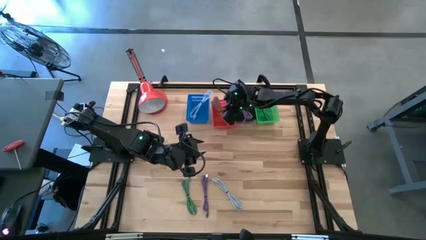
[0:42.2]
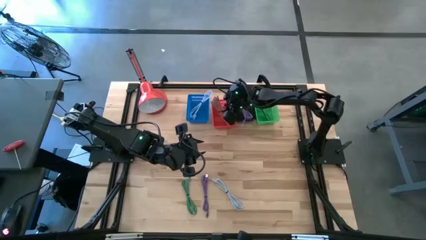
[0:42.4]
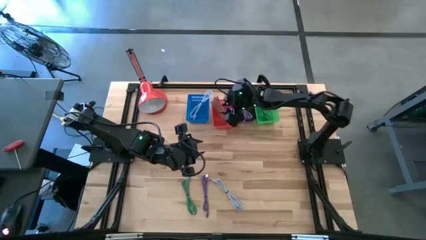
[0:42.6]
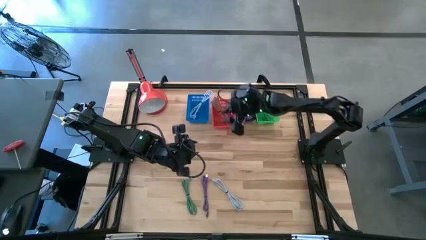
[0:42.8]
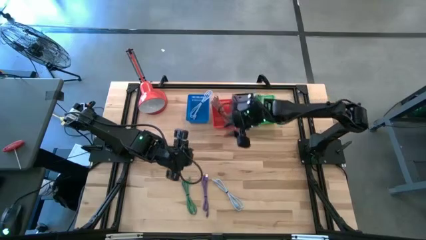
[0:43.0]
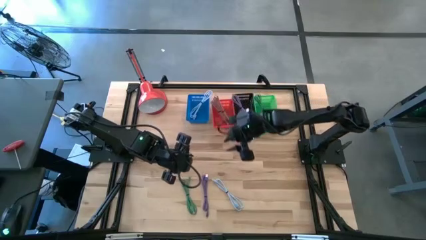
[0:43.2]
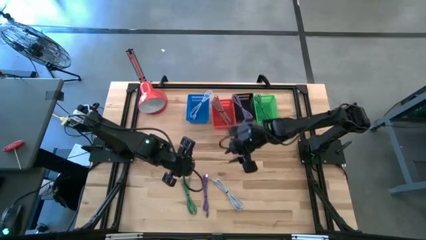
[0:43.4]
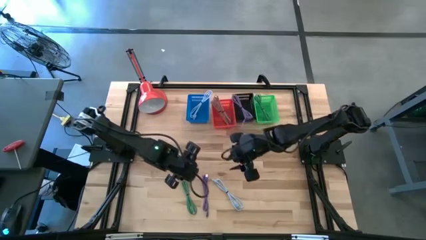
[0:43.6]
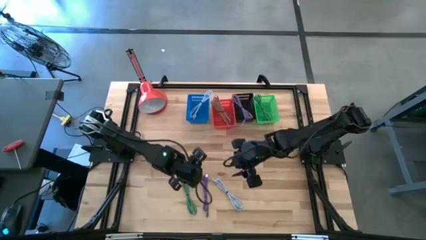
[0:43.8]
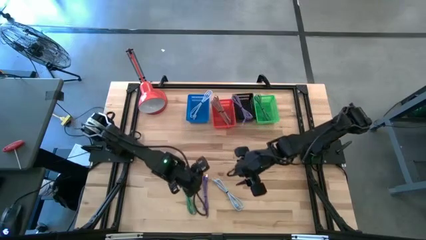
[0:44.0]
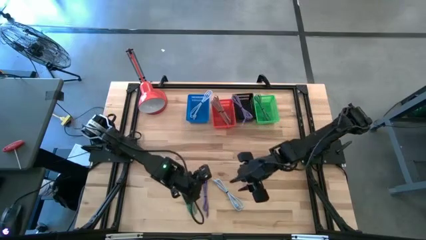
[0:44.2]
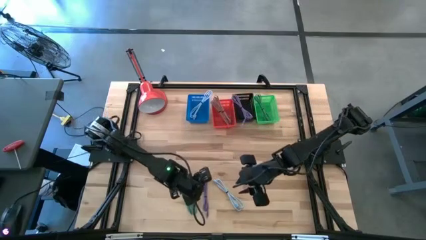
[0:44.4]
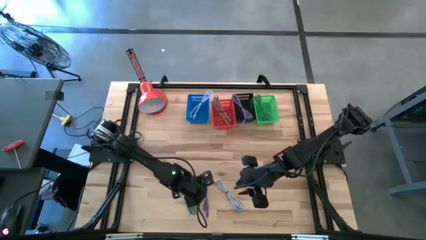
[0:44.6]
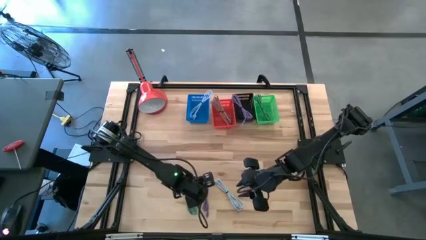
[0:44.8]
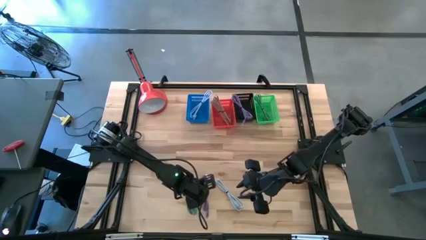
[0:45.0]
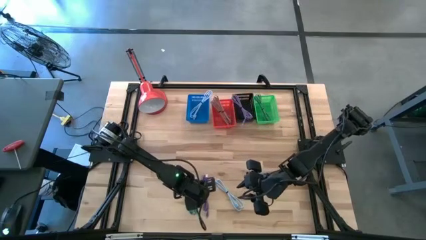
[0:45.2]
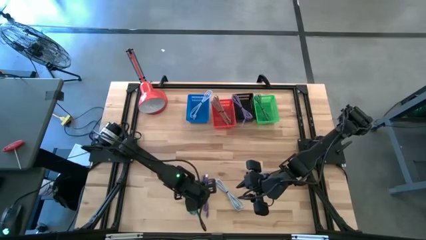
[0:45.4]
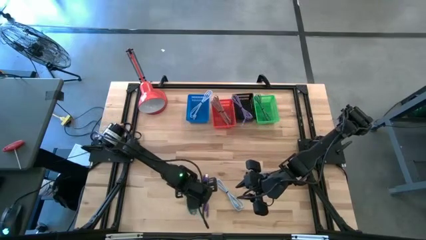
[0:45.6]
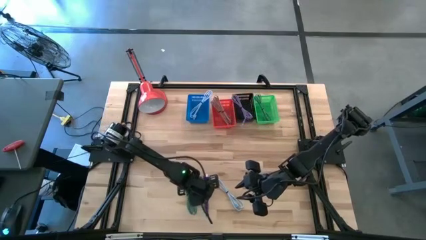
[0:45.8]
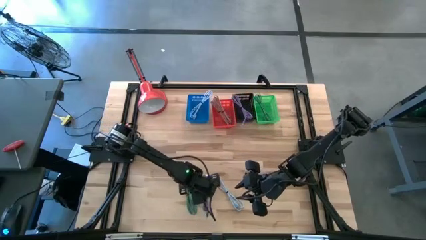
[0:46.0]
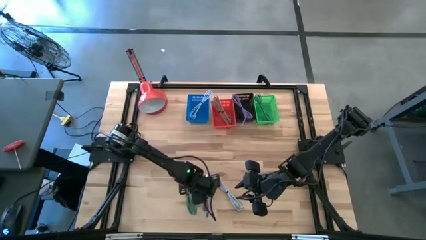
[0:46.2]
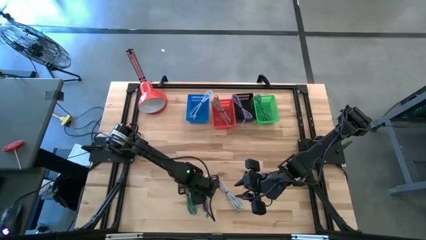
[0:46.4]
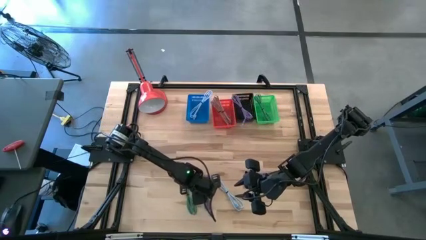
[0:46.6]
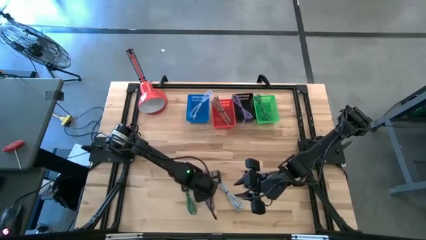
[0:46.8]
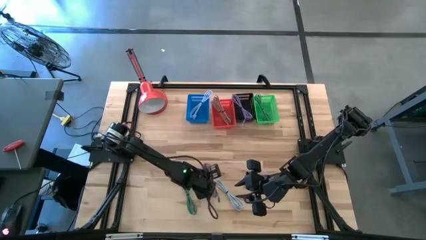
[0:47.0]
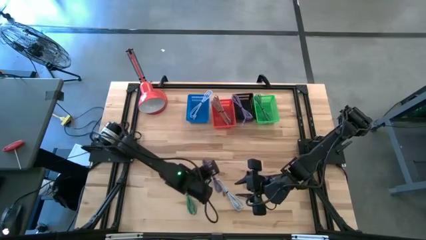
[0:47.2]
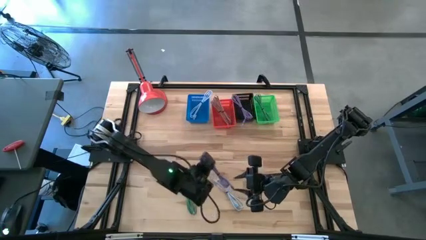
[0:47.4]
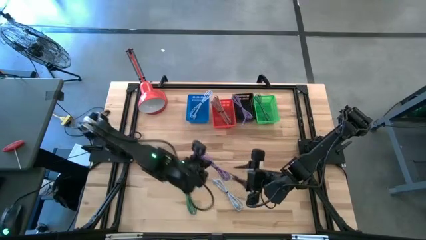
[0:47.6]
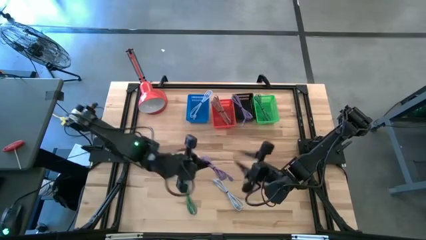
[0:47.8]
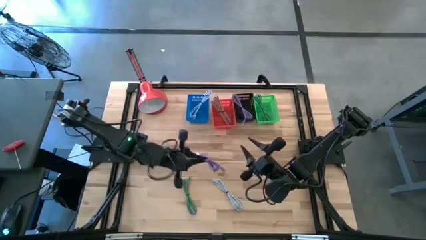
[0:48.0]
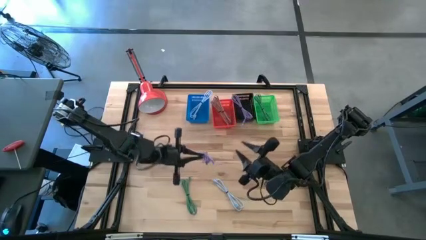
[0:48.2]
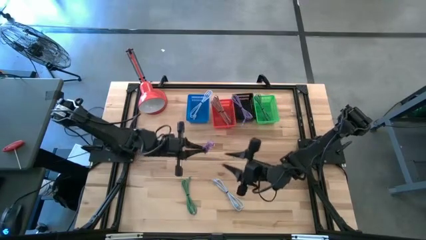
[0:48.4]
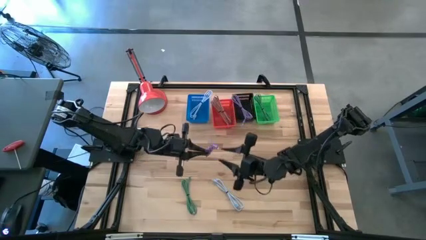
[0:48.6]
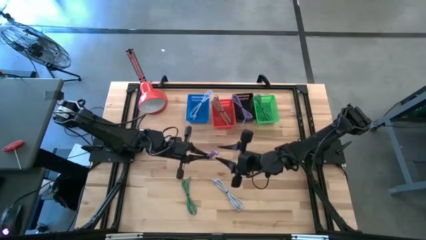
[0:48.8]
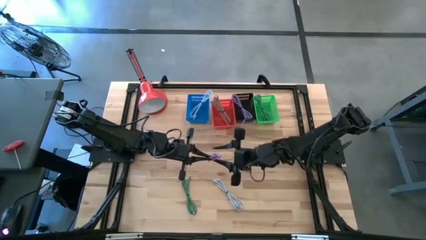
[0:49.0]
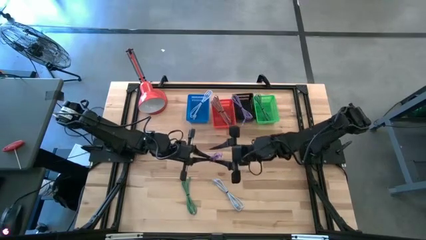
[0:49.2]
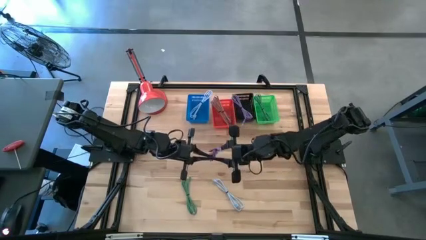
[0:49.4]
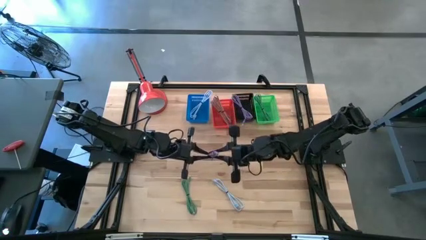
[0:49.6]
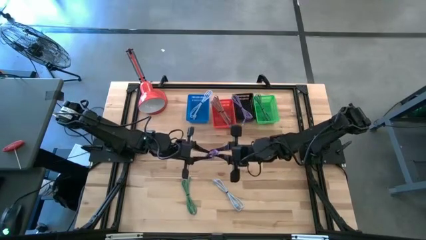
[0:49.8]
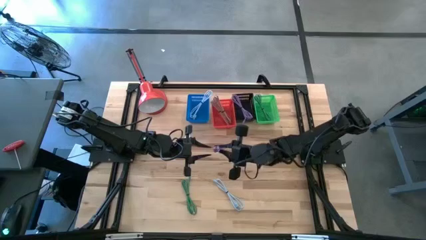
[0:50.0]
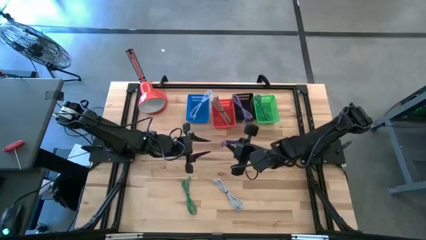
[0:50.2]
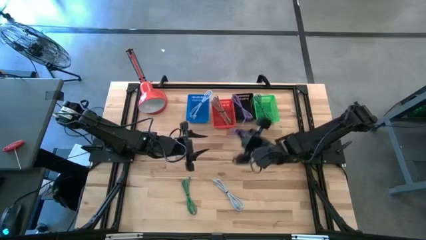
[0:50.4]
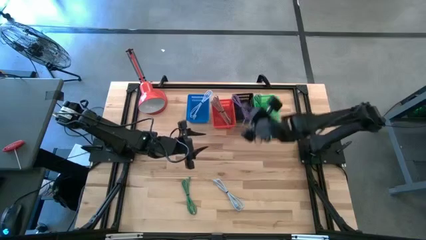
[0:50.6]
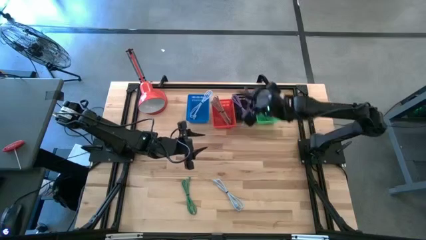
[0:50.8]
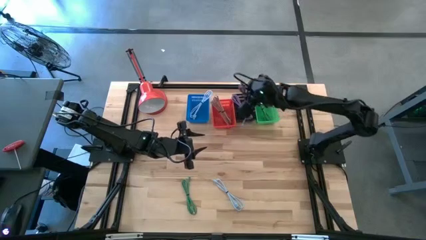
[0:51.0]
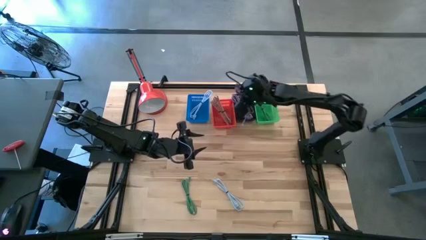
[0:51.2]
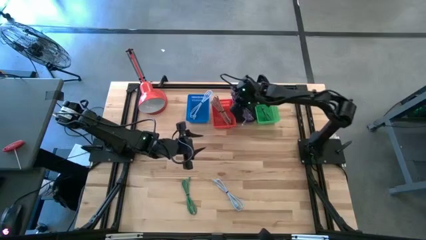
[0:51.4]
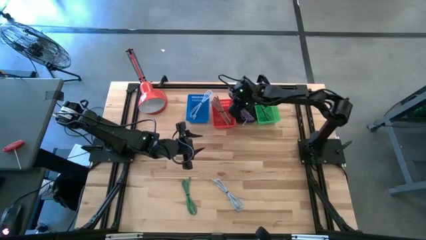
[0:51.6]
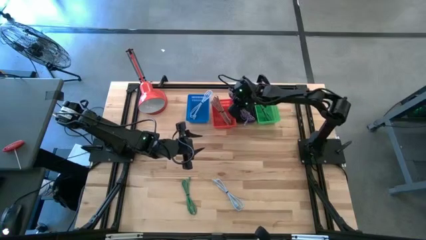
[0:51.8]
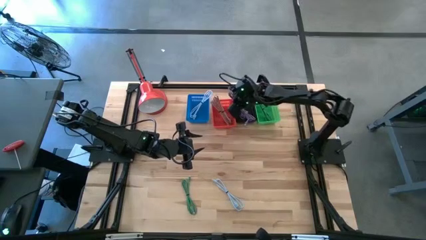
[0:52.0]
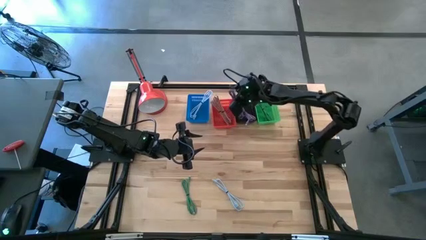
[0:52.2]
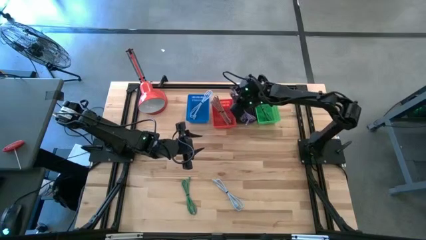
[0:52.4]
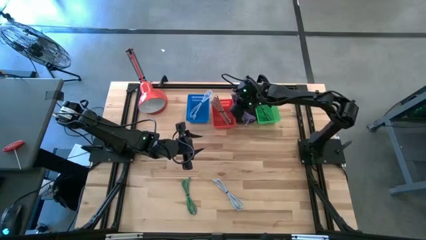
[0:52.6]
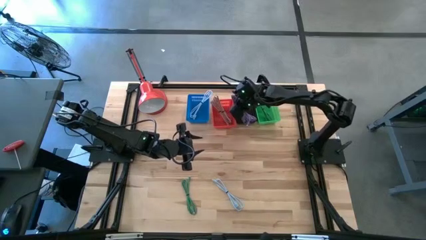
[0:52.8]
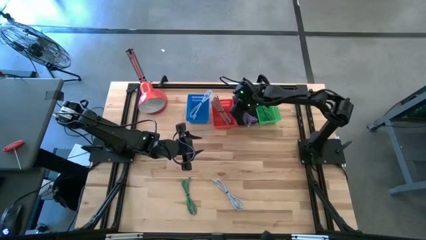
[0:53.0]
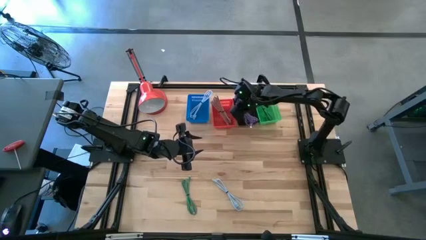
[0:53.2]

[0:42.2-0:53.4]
Task: Pick & Place USB Port
Put the purple charger cable into the black bin

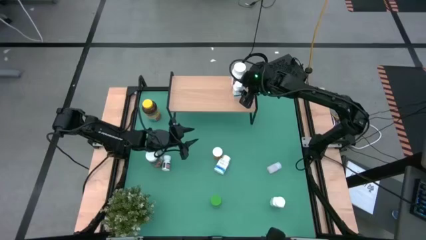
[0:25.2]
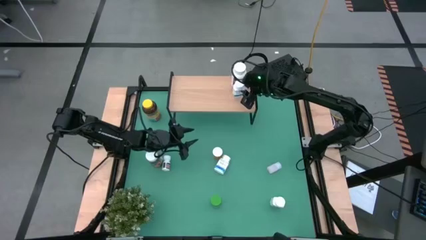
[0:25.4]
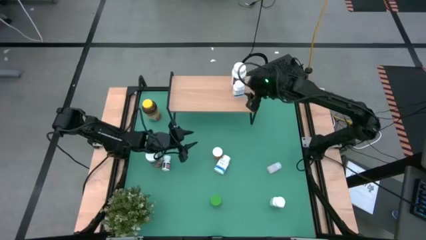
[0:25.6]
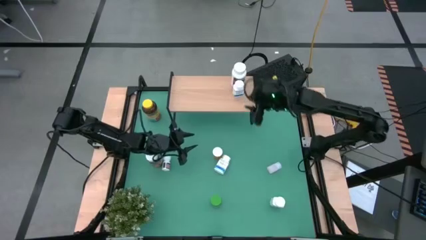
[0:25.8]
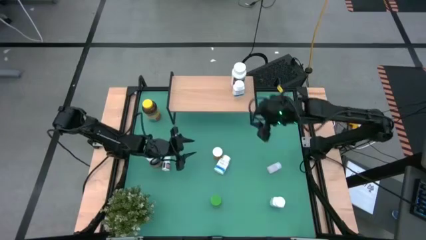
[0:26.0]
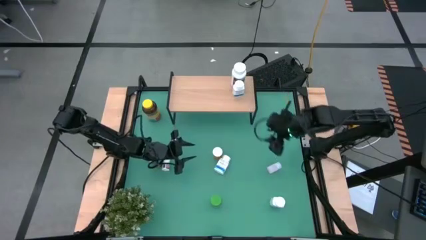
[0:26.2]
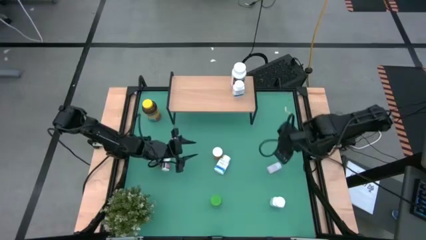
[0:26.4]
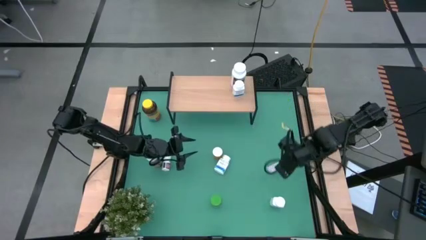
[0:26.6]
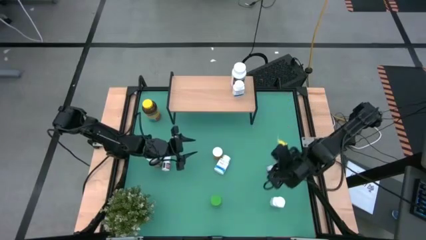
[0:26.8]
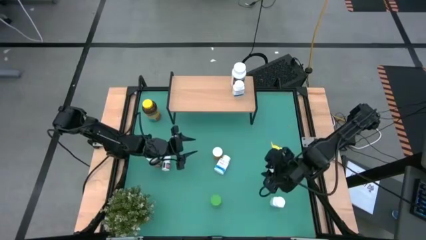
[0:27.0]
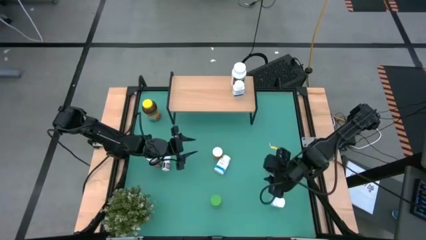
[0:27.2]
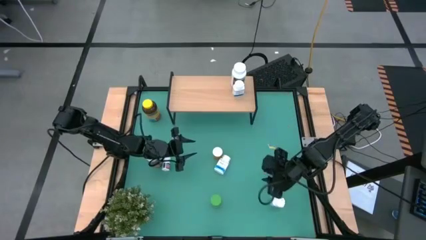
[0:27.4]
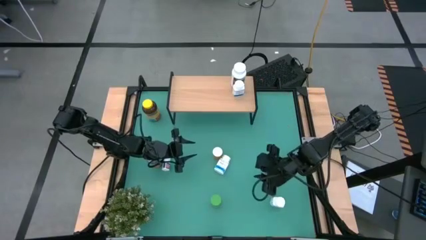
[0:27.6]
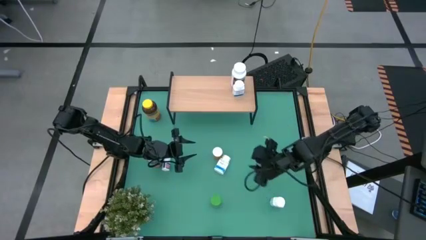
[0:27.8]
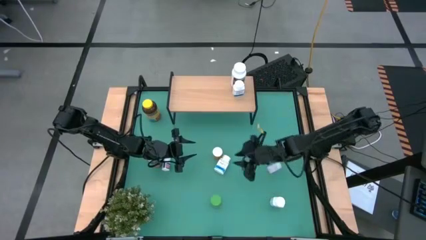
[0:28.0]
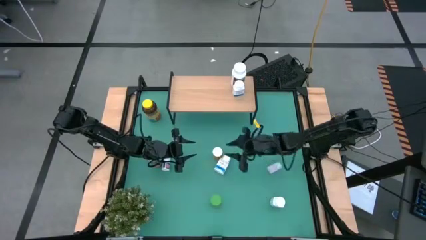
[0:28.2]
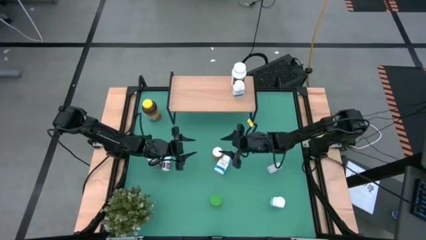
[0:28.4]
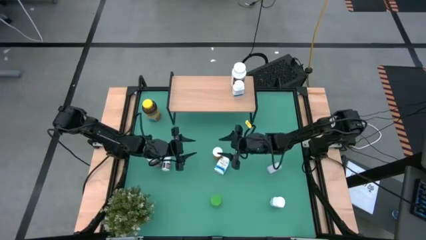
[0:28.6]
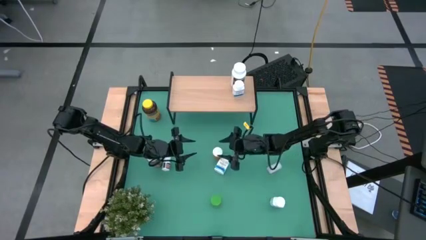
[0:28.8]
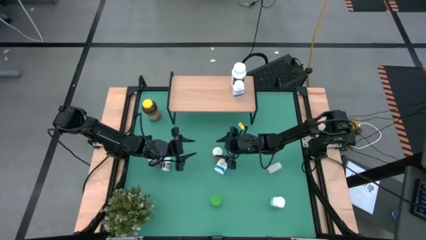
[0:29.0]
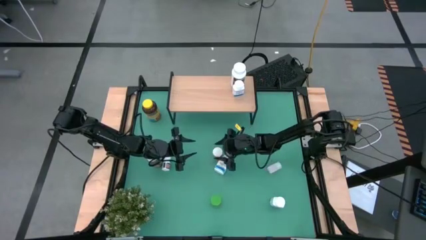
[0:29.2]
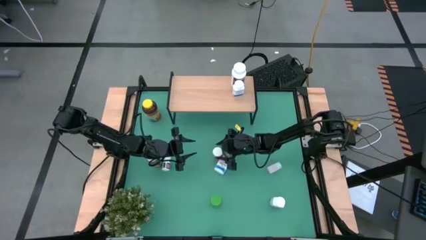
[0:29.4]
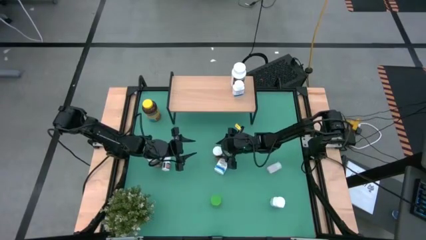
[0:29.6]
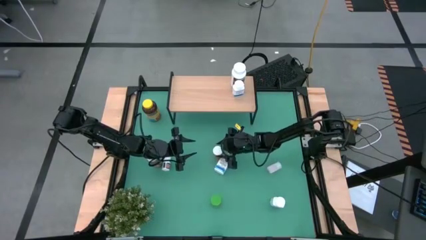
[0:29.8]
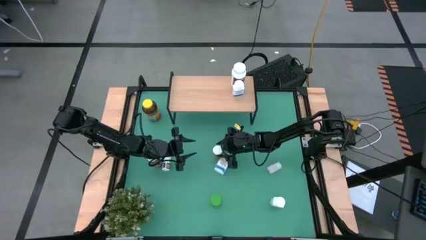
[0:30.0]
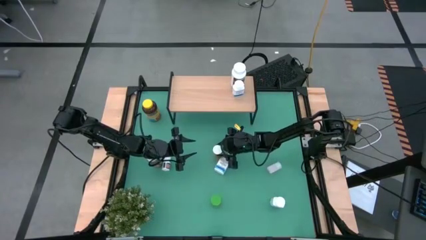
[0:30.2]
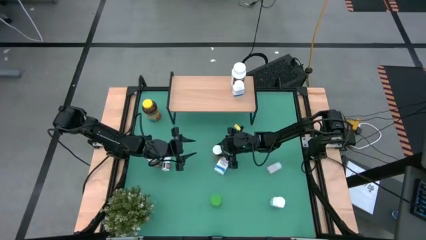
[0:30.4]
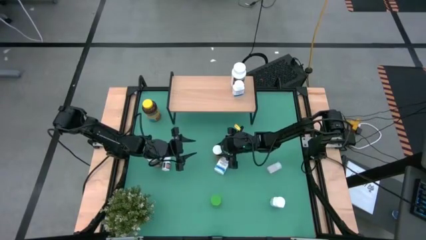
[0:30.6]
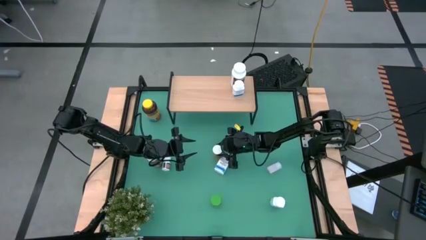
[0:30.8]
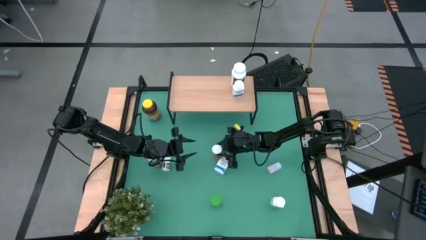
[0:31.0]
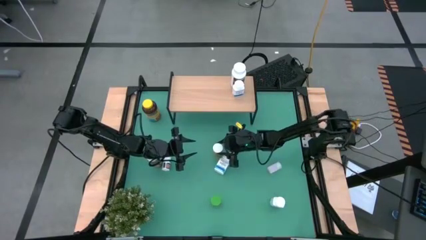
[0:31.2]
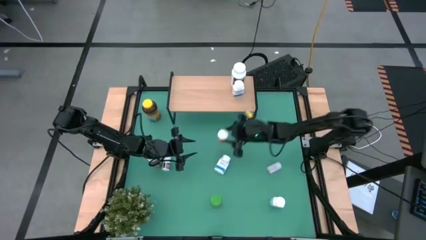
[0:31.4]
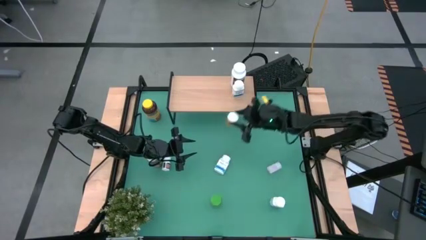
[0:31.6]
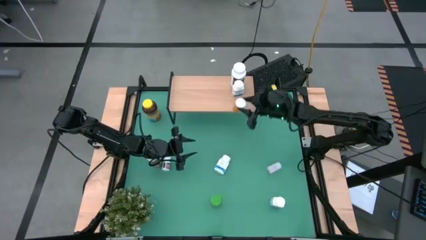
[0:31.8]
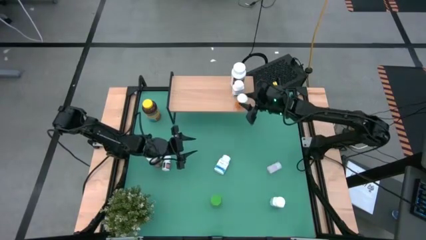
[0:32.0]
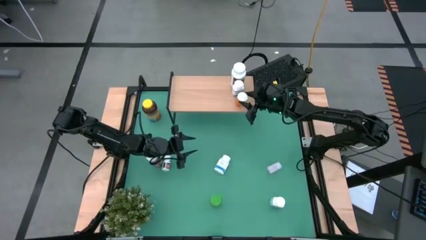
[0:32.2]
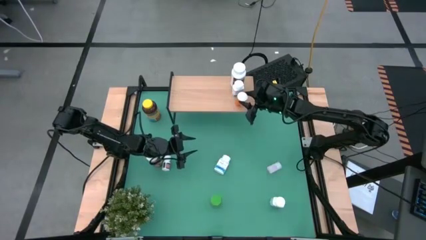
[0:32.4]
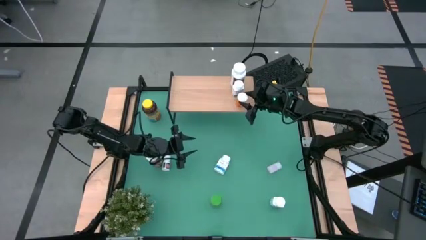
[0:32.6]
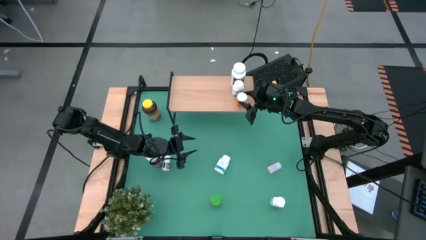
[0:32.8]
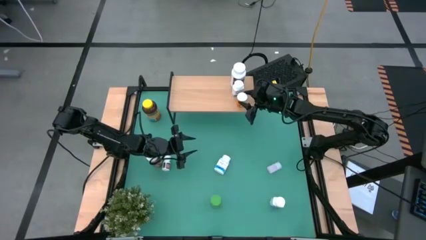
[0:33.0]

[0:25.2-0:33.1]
Task: Pick and place medicine bottles onto shelf by color
Put the orange medicine bottle on the shelf
